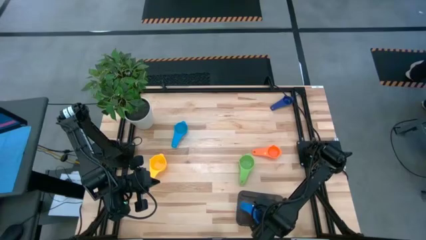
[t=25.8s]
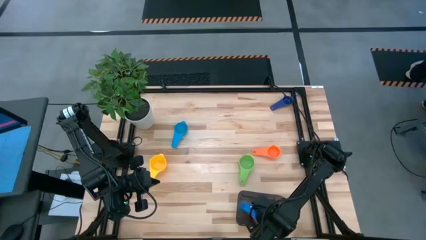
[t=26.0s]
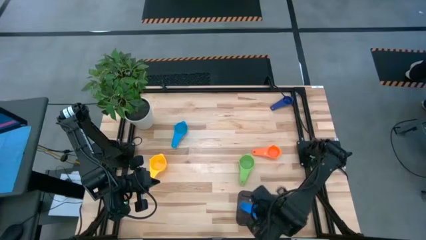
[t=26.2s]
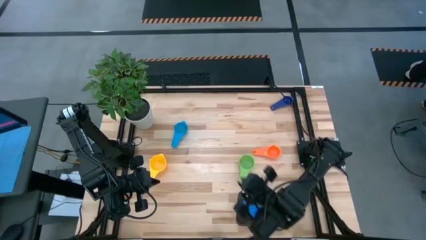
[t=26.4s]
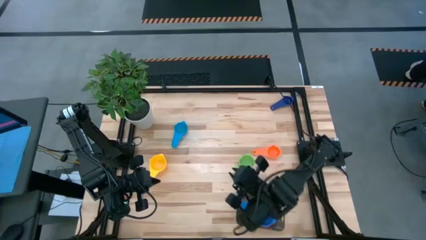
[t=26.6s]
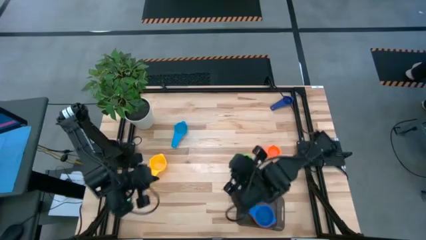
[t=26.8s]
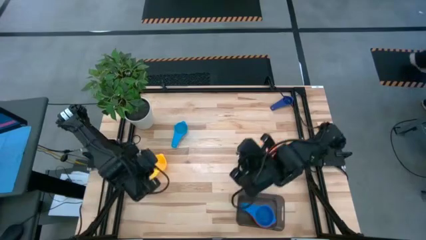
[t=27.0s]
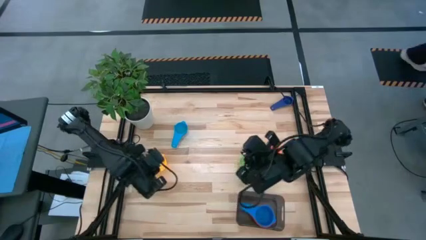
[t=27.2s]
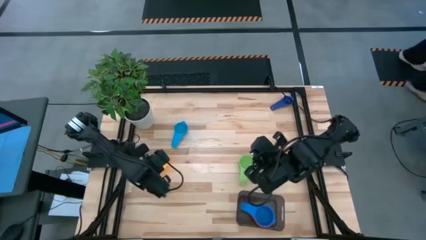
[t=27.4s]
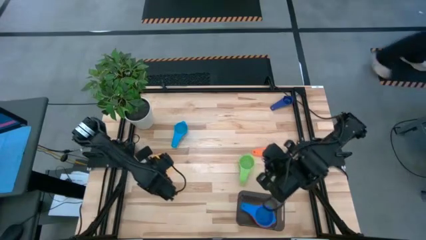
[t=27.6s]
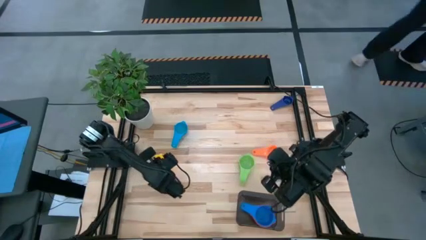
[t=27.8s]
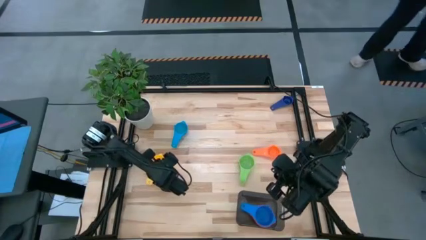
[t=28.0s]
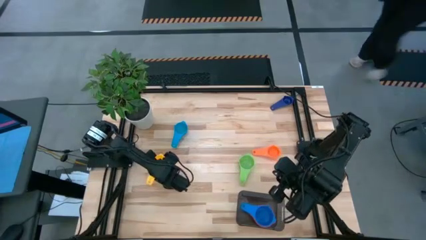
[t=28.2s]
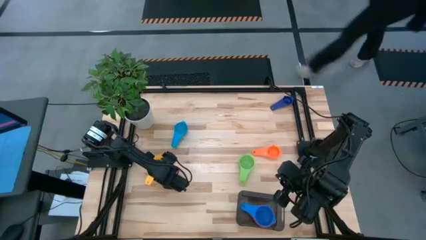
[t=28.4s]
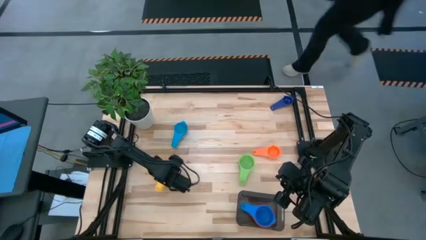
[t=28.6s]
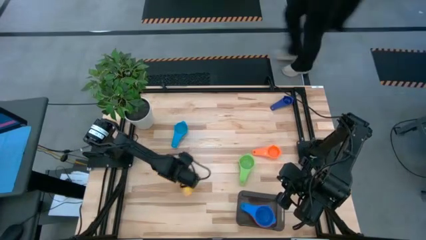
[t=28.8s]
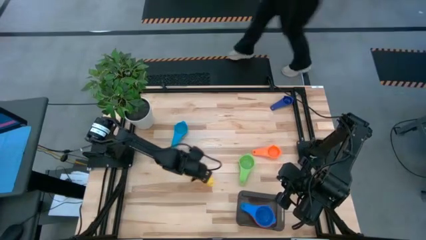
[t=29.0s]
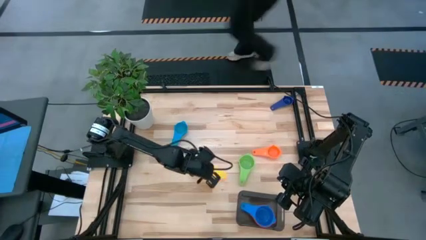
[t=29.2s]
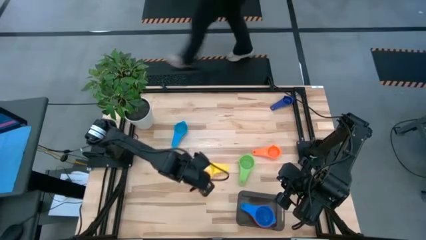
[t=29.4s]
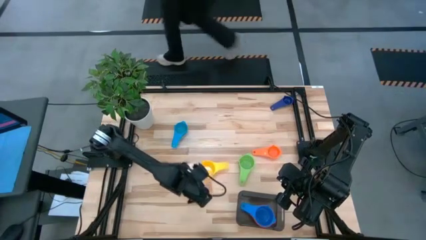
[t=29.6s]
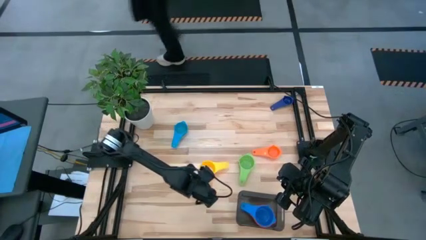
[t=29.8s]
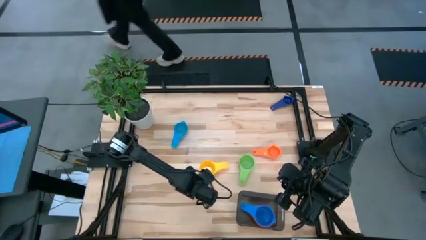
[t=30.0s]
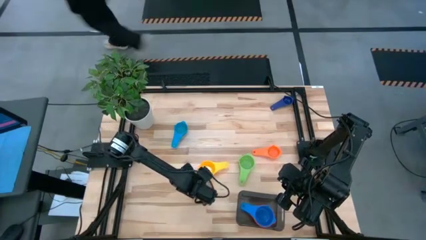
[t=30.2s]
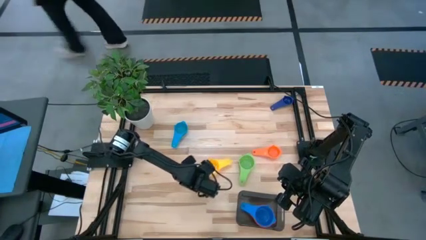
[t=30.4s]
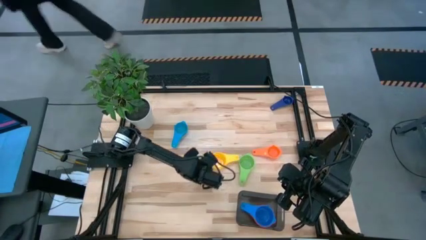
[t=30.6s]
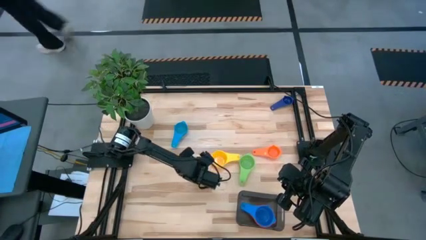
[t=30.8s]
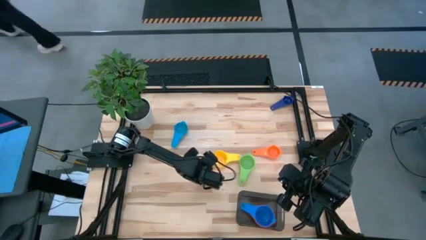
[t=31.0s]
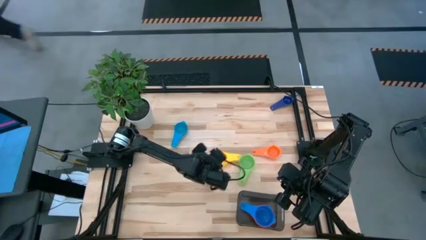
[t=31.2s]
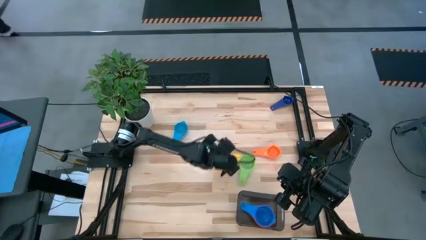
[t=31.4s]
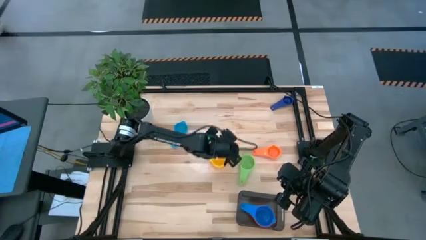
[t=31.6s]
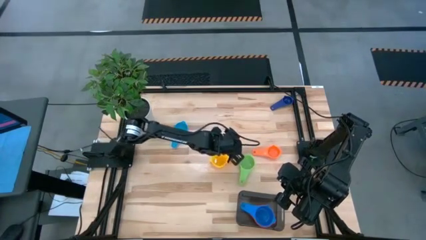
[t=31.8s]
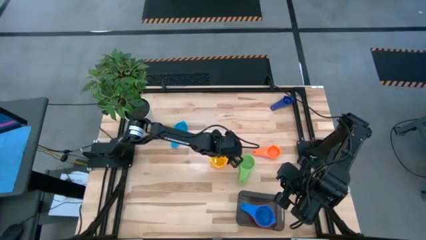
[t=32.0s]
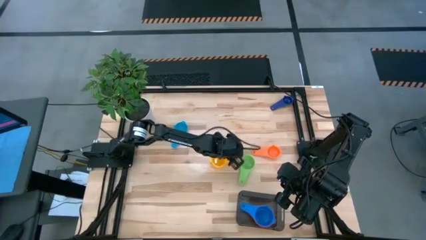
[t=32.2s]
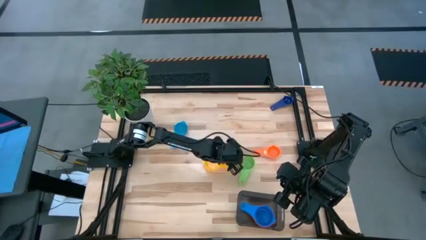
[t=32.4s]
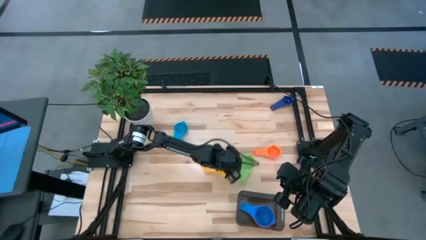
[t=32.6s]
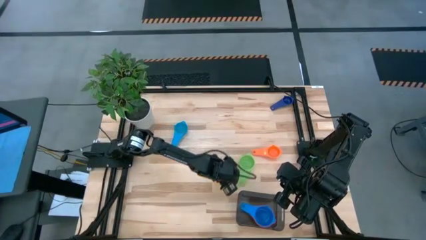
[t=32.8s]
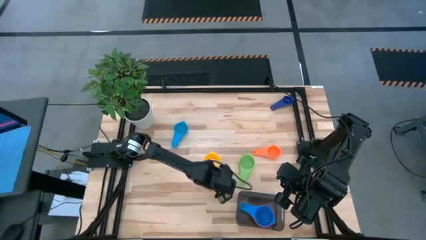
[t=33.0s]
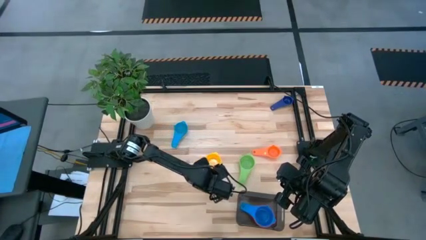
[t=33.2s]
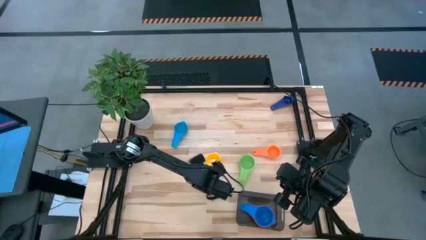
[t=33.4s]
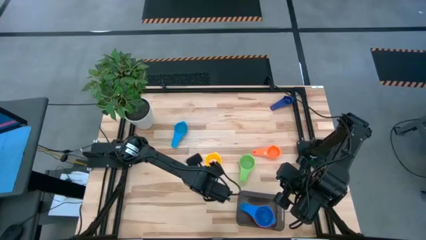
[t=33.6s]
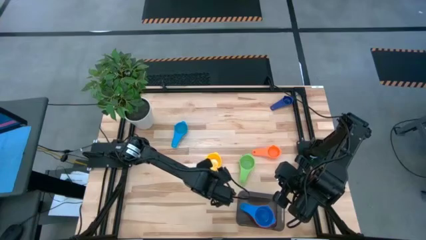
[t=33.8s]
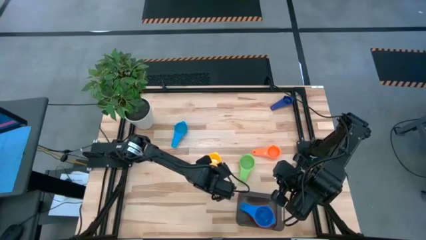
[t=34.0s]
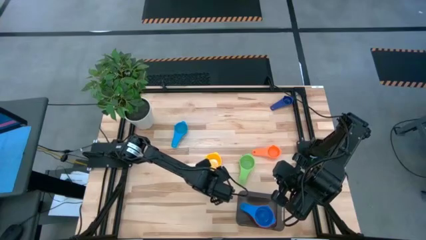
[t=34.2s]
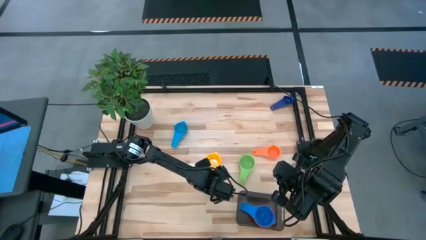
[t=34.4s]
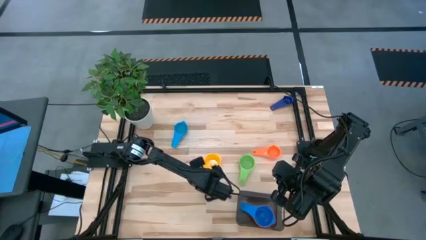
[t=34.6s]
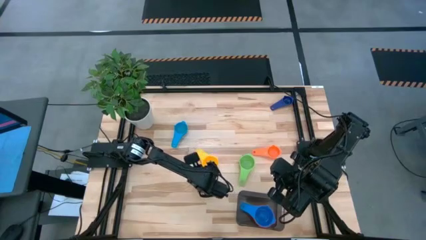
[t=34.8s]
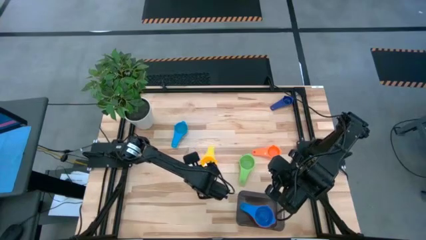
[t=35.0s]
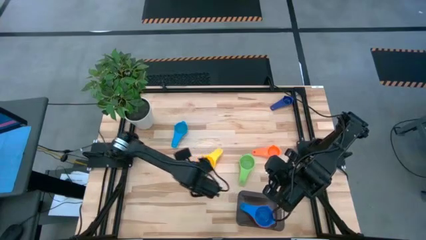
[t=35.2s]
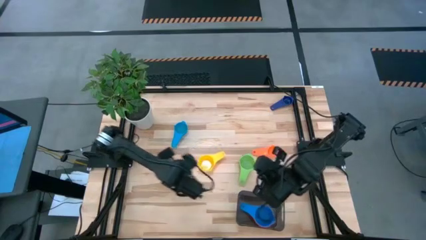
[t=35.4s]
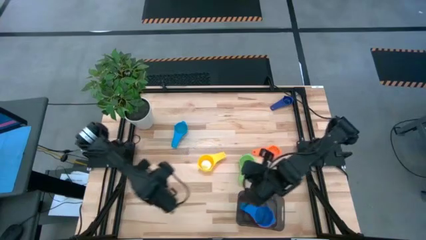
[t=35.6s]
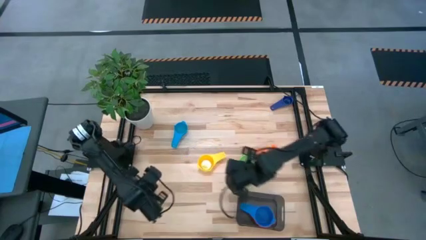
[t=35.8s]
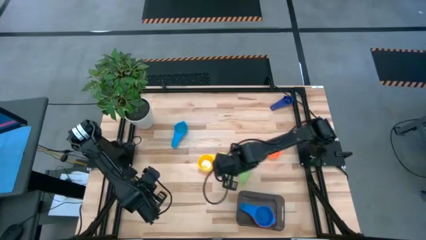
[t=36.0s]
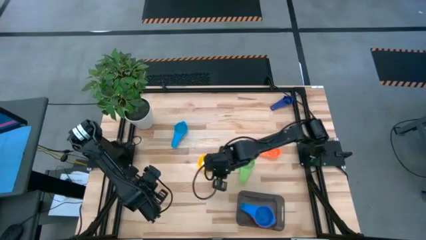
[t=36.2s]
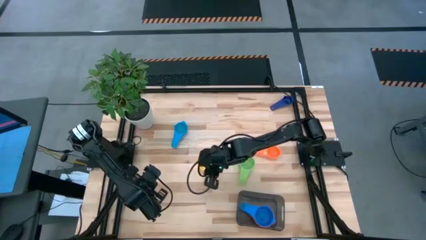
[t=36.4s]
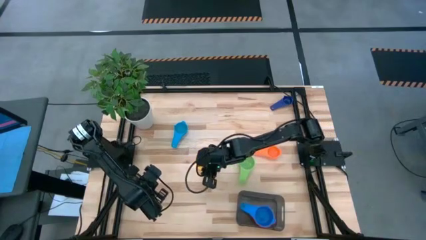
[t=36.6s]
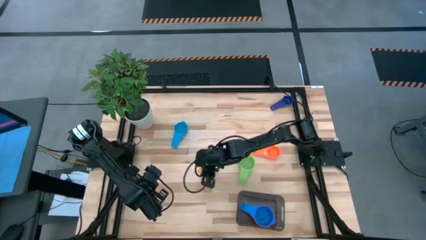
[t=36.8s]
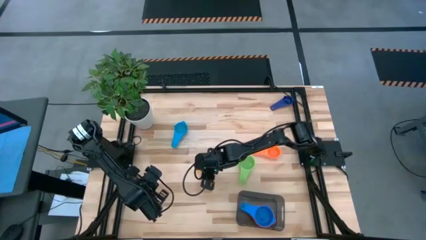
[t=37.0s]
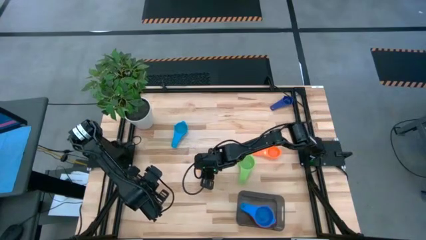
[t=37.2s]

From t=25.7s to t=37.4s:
Task: Nest measuring cups in basket
Stack the yellow measuring cup on top of the blue measuring cup in the black bin
